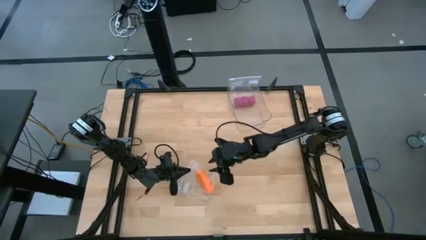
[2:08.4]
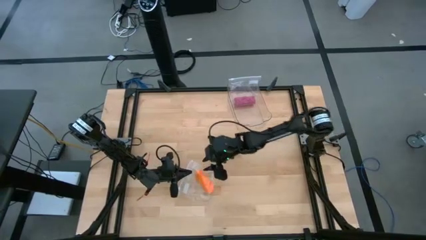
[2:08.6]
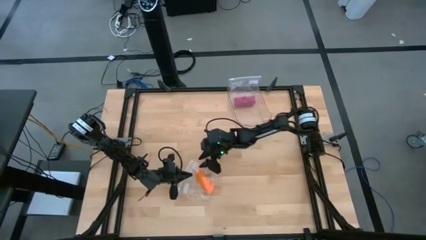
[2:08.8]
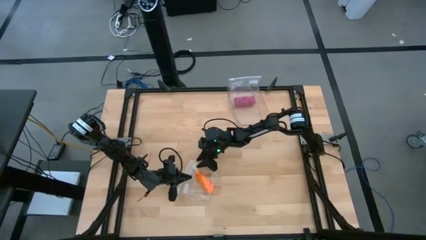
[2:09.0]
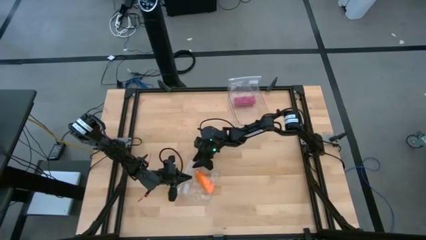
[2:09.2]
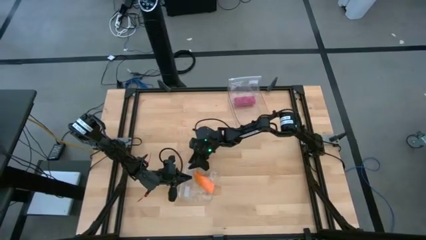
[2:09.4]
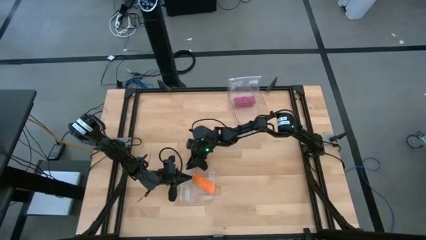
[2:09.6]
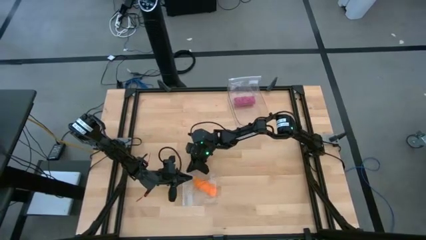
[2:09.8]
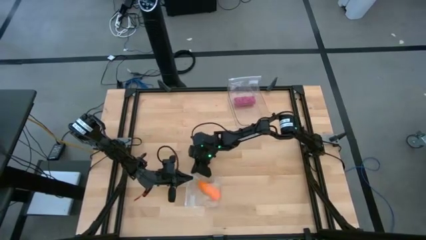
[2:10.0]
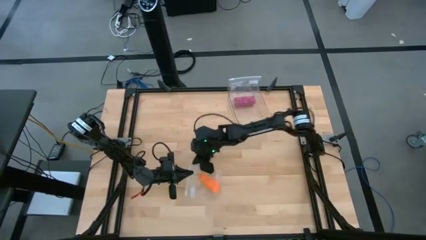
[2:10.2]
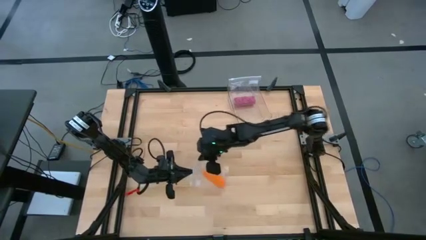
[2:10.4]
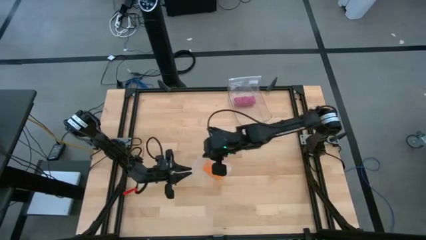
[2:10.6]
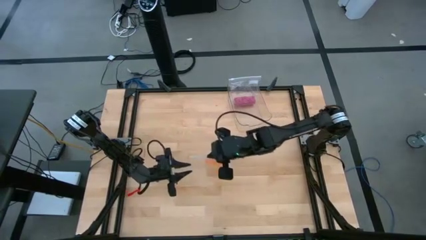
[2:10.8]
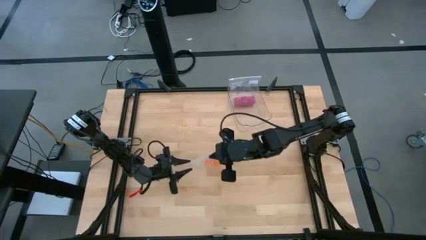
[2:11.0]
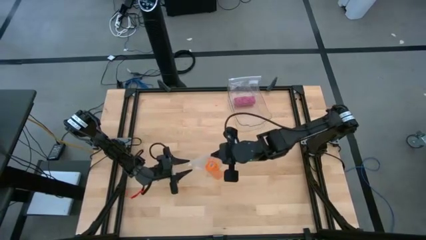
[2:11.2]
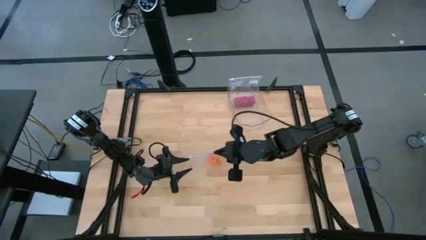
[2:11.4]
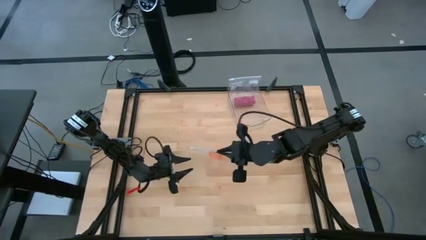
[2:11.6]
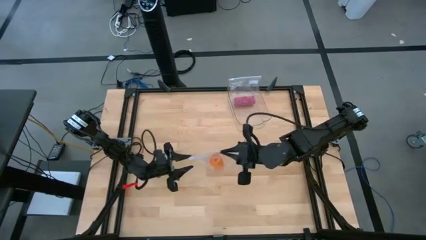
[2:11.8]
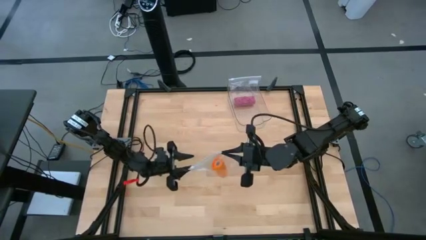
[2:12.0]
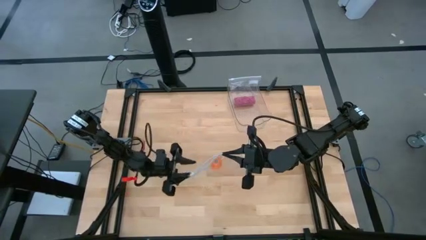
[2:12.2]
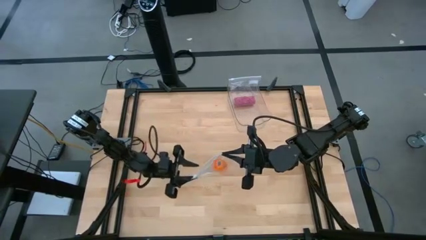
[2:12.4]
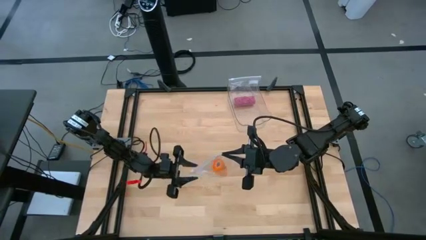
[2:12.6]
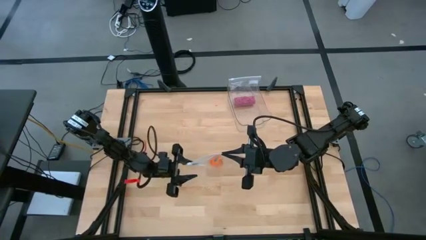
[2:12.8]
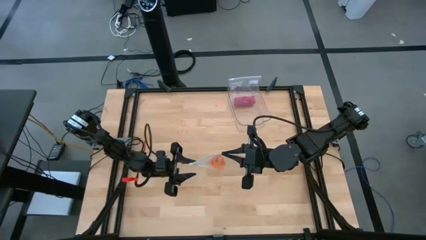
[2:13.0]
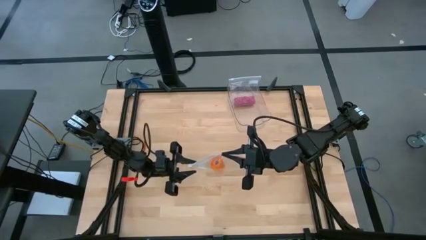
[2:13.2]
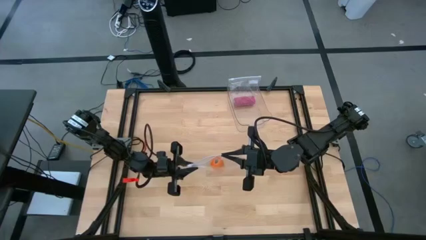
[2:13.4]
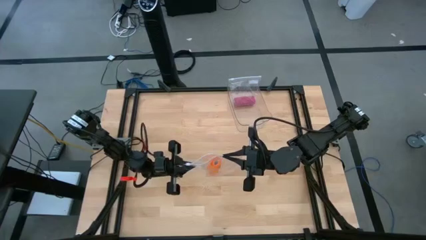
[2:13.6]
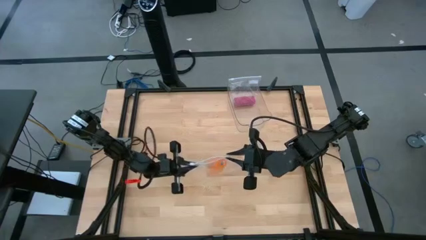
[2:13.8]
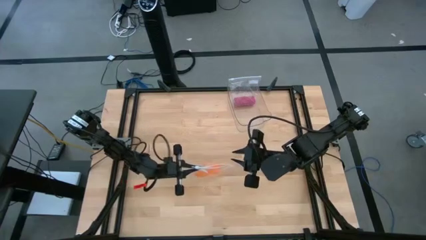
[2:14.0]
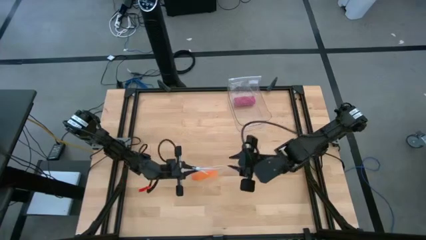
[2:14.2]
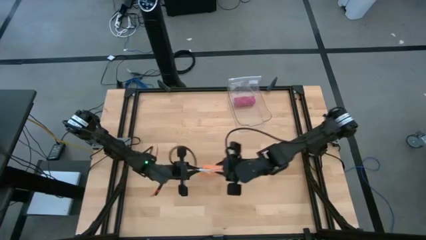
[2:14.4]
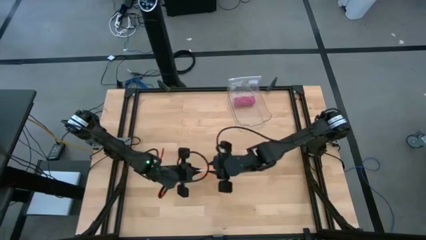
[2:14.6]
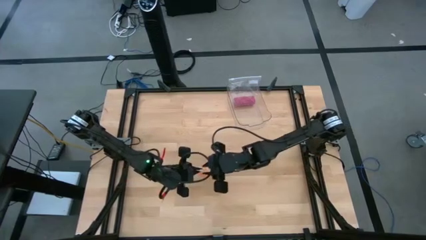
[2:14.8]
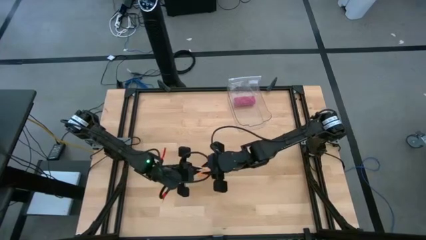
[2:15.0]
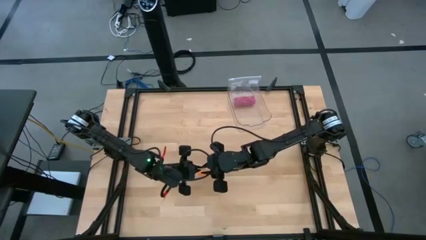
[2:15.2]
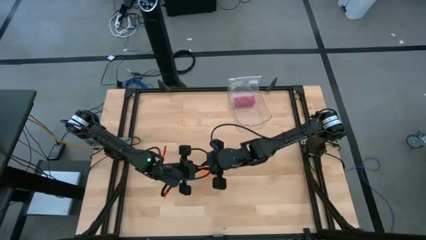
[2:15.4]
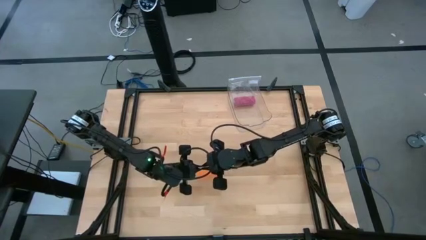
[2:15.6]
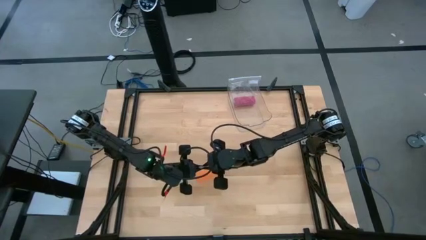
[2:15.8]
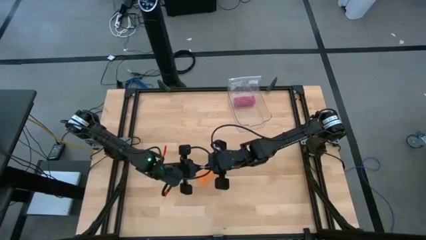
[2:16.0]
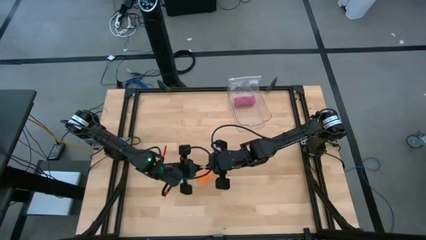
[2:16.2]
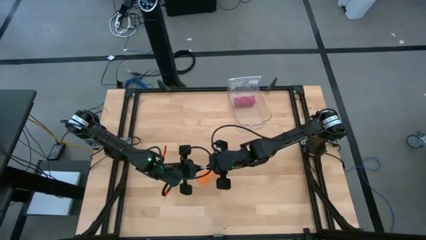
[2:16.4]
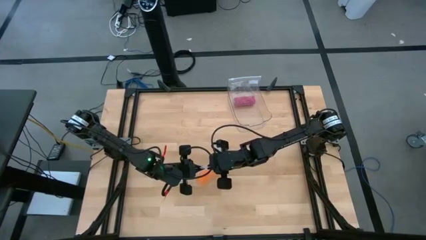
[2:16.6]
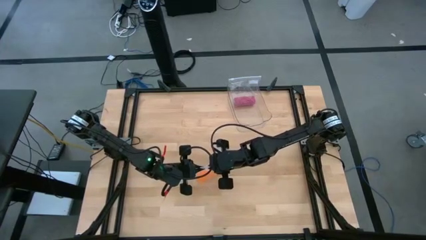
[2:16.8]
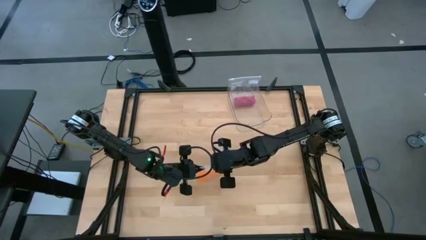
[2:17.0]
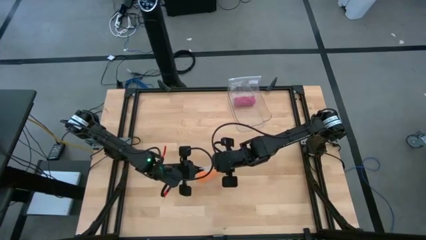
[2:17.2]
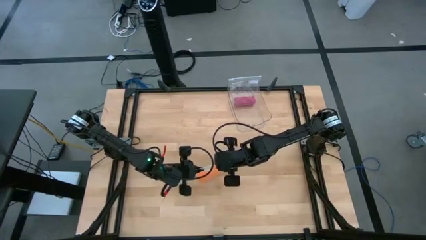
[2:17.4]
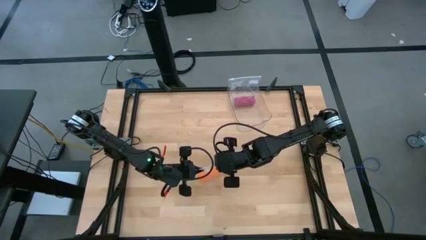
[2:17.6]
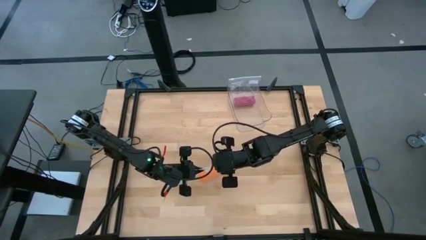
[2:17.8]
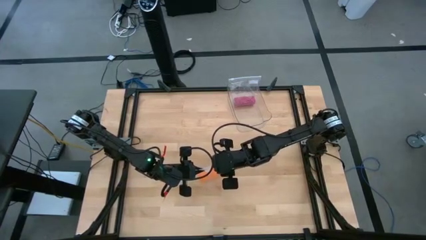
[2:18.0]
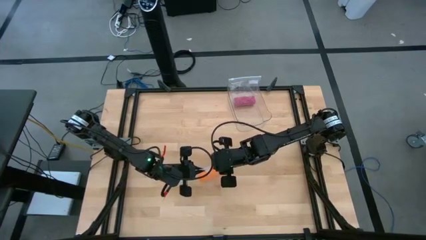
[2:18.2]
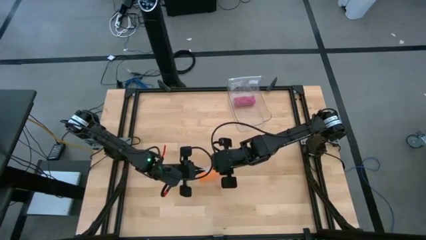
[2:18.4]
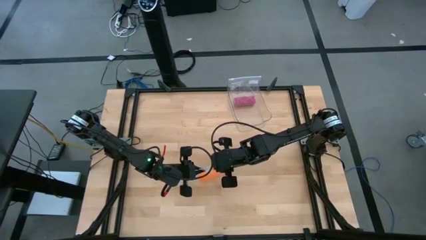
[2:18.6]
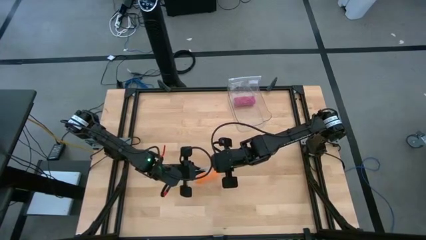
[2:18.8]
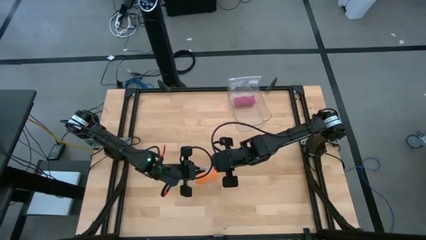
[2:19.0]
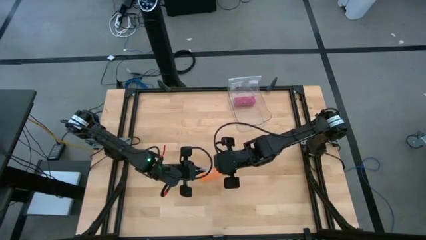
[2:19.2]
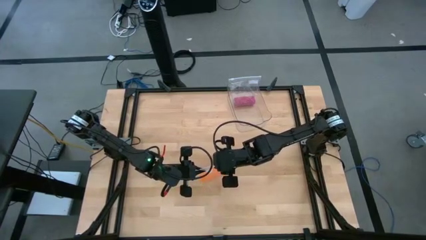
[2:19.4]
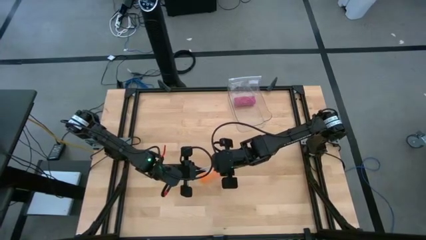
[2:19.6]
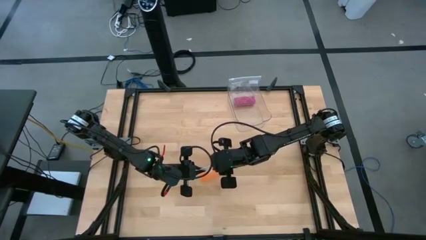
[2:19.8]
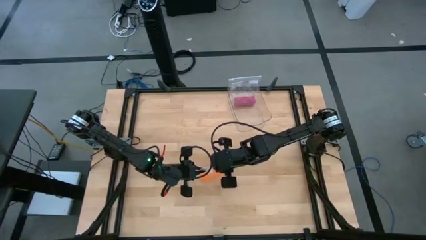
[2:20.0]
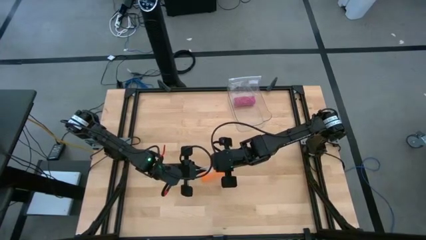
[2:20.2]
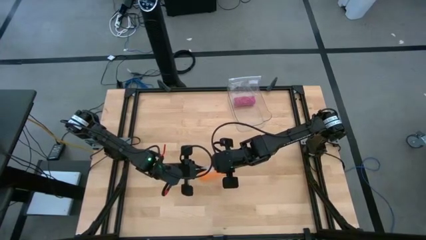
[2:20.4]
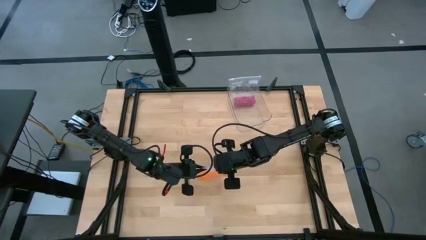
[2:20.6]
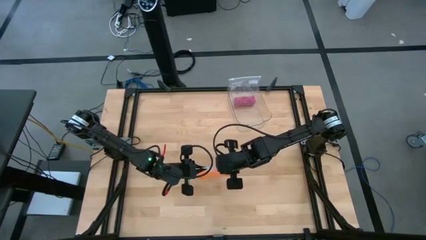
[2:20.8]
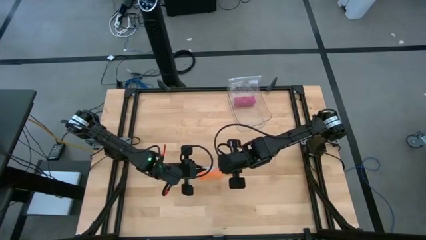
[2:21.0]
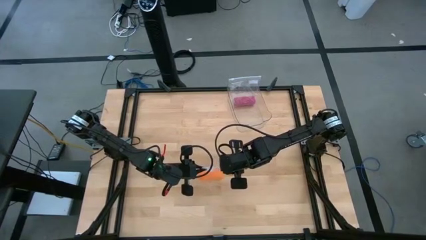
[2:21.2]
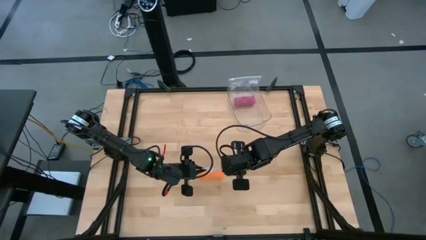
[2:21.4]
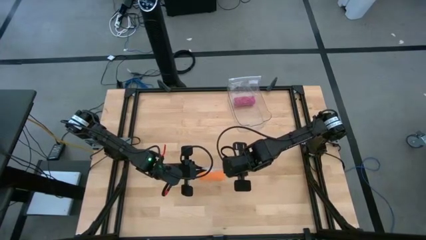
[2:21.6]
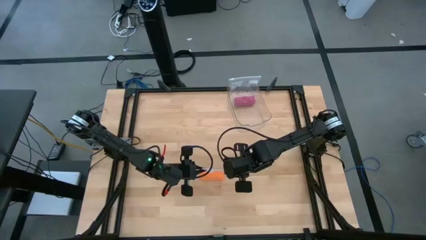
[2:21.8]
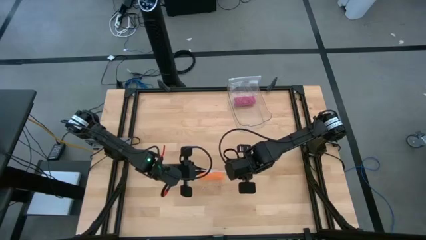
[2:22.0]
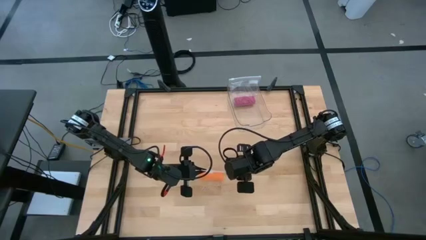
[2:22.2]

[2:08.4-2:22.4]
Task: Roll bandage
Close the transparent zip bag

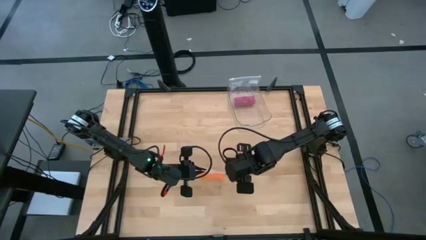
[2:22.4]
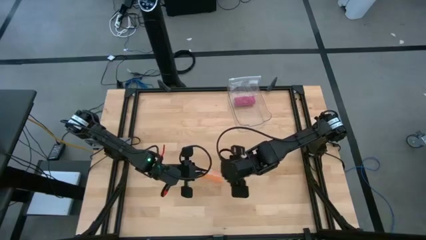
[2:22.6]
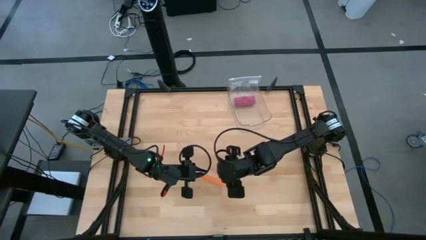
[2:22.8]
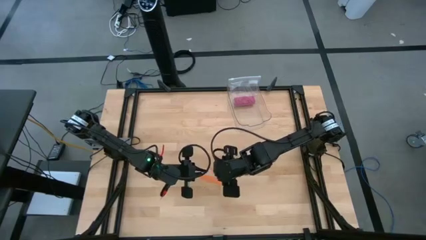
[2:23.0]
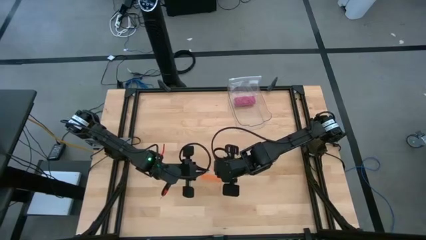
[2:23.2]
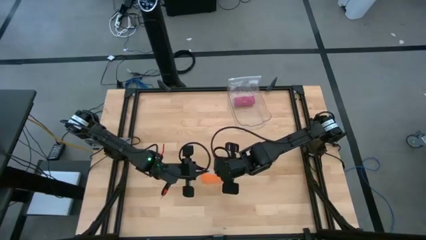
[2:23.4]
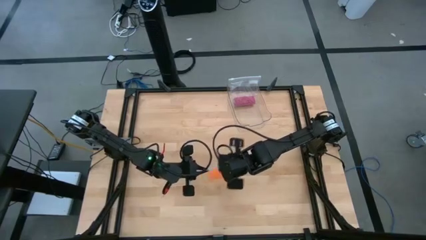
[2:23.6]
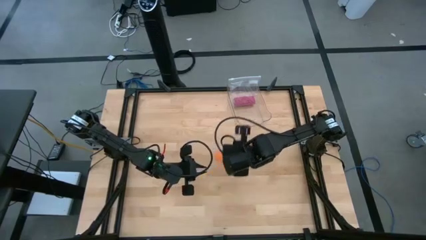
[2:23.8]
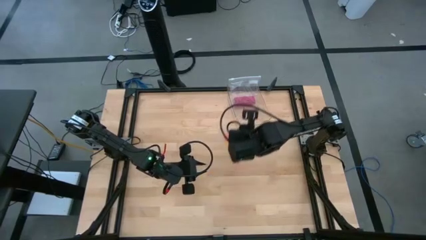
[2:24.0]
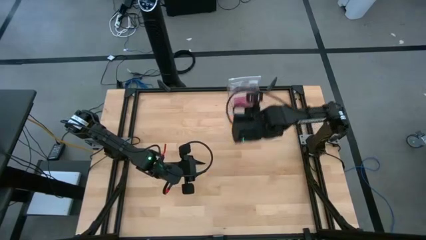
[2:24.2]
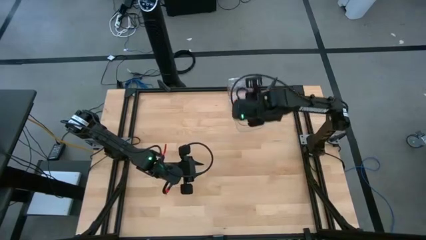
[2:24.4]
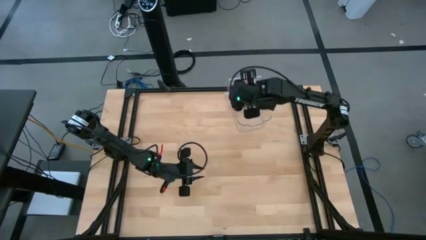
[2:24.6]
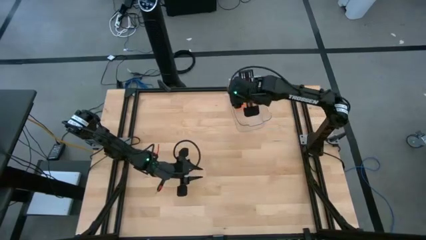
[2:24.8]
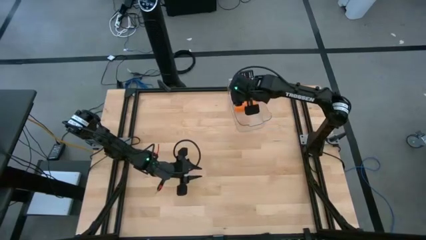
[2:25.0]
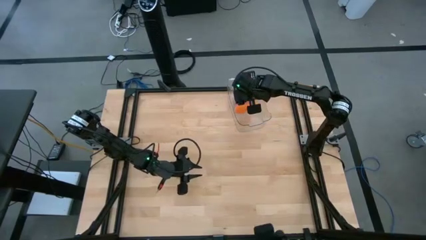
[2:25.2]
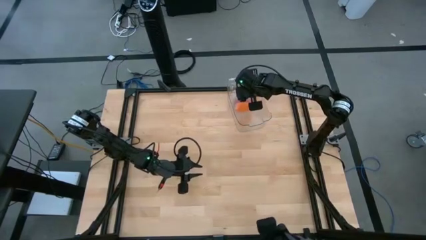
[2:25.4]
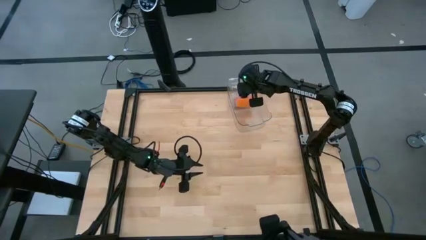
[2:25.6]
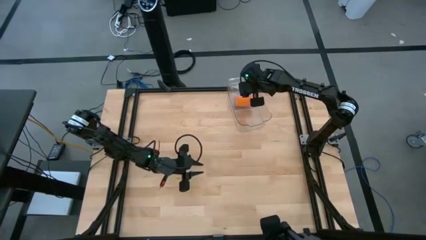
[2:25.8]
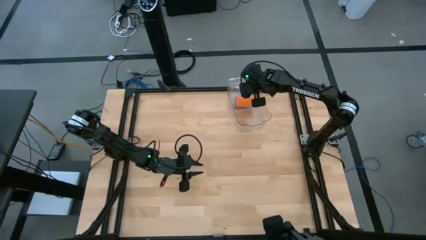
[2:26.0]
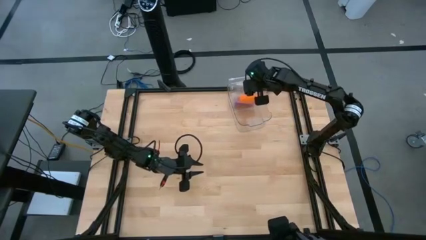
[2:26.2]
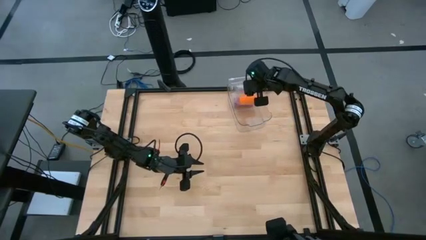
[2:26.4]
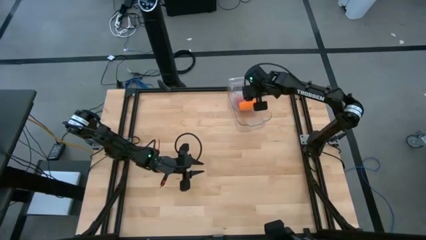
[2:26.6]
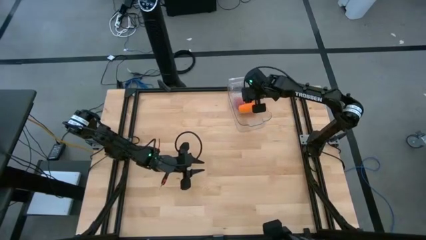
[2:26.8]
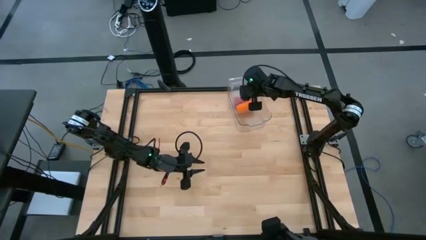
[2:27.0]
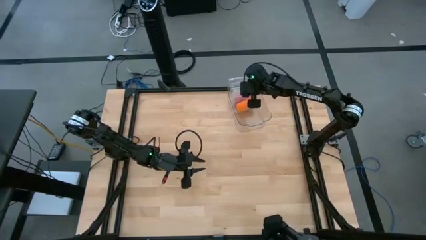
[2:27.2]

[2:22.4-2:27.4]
Put the transparent zip bag into the transparent bin
